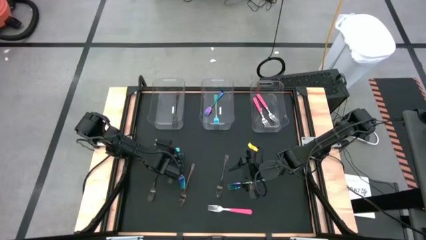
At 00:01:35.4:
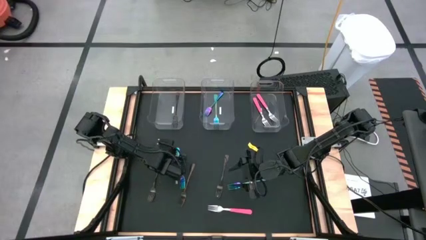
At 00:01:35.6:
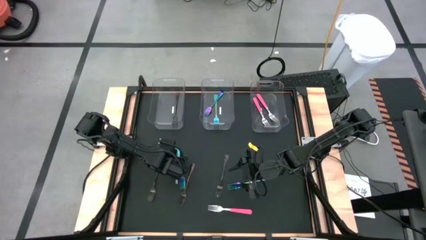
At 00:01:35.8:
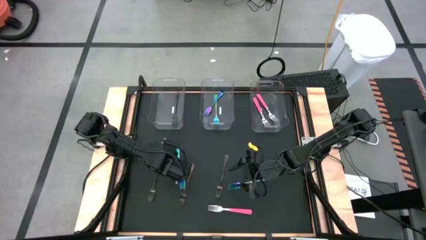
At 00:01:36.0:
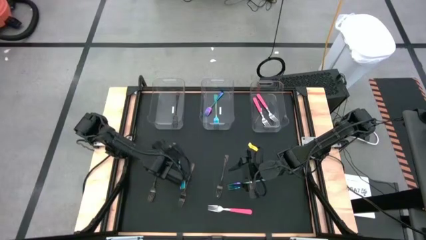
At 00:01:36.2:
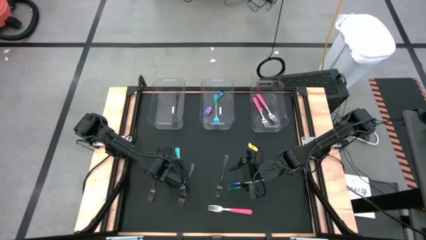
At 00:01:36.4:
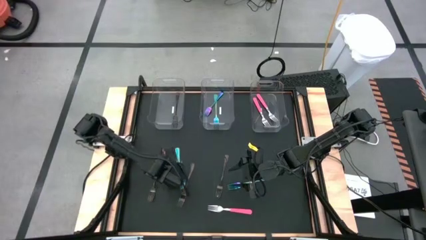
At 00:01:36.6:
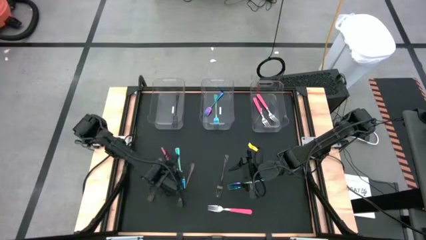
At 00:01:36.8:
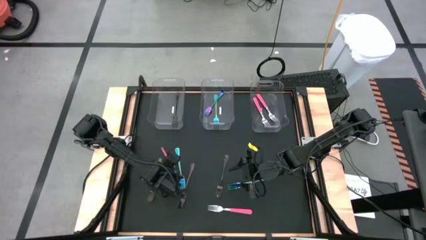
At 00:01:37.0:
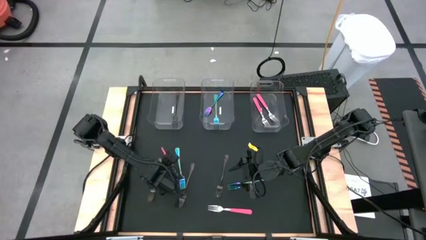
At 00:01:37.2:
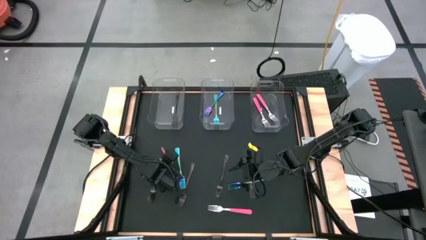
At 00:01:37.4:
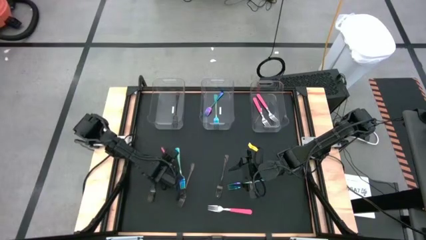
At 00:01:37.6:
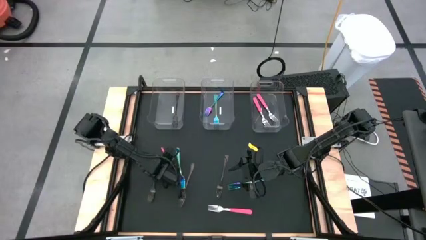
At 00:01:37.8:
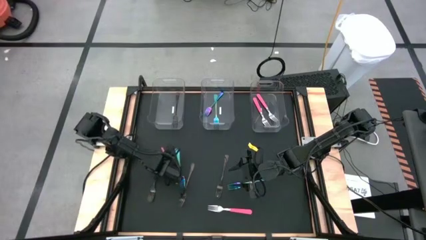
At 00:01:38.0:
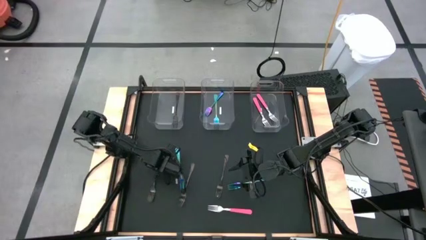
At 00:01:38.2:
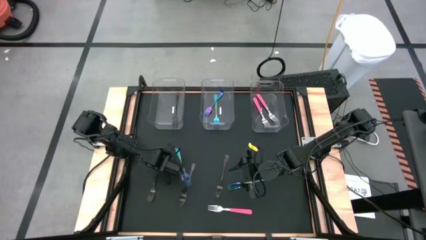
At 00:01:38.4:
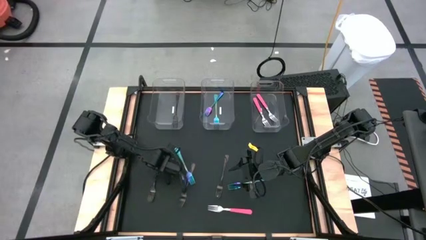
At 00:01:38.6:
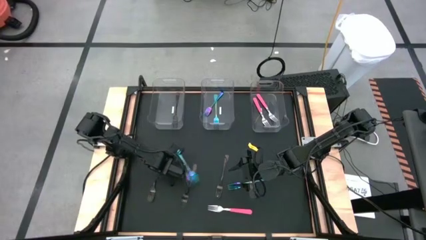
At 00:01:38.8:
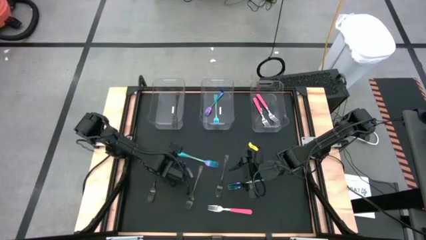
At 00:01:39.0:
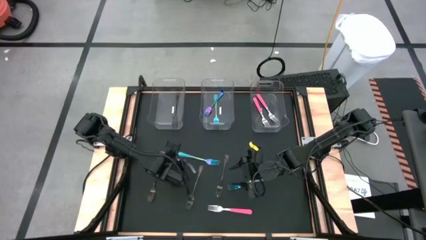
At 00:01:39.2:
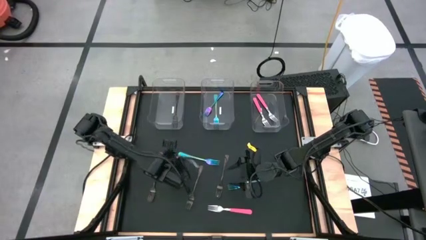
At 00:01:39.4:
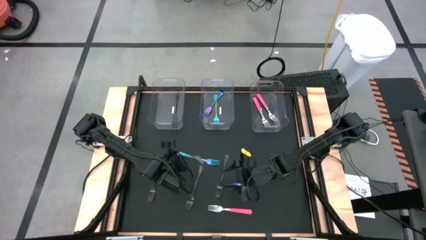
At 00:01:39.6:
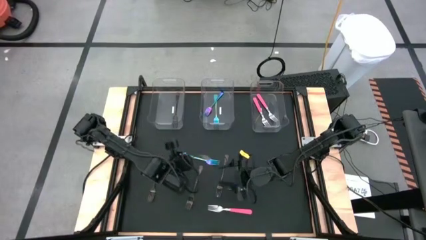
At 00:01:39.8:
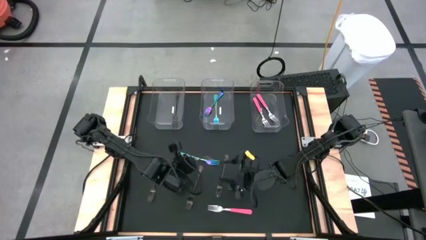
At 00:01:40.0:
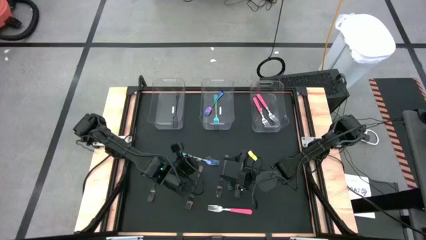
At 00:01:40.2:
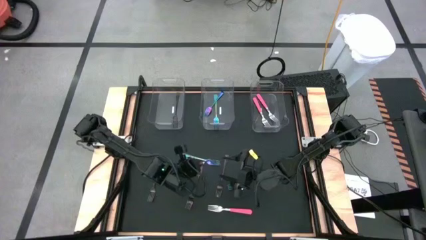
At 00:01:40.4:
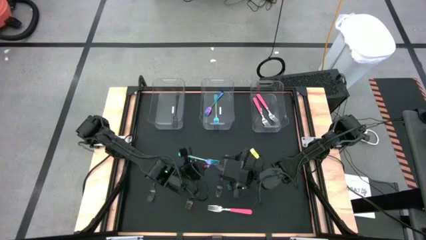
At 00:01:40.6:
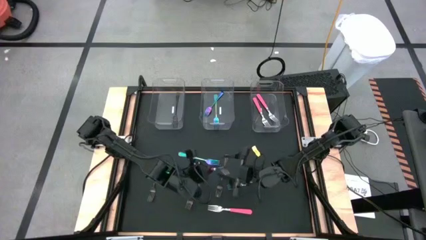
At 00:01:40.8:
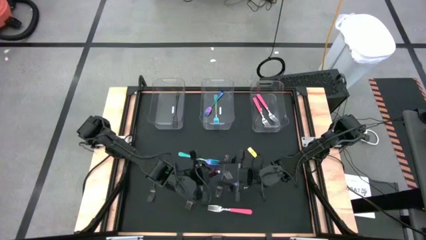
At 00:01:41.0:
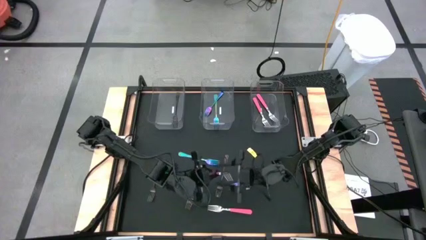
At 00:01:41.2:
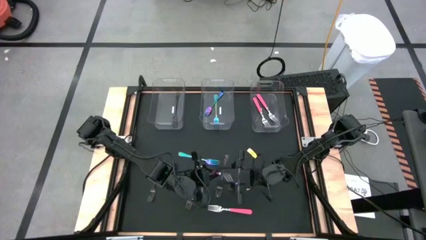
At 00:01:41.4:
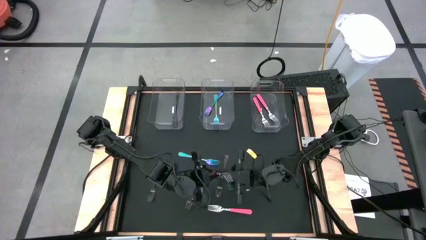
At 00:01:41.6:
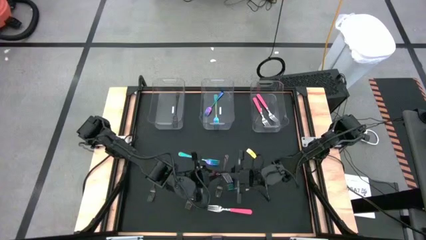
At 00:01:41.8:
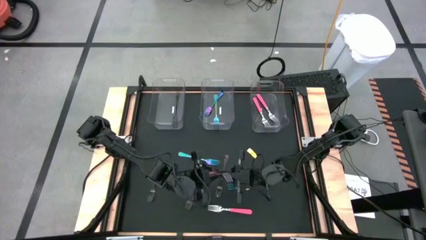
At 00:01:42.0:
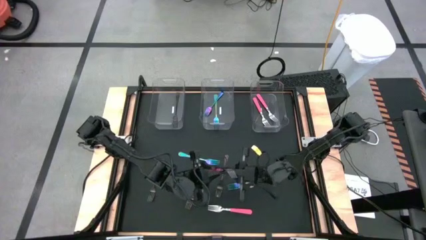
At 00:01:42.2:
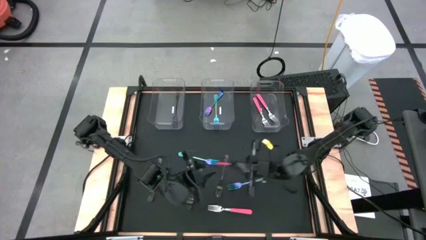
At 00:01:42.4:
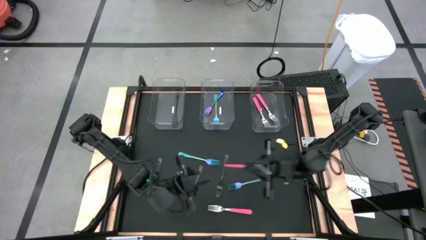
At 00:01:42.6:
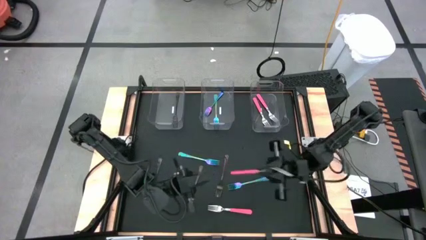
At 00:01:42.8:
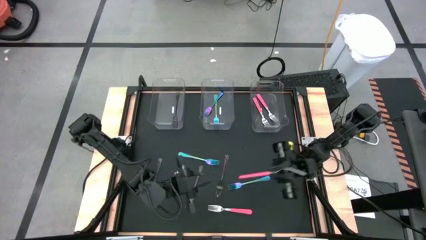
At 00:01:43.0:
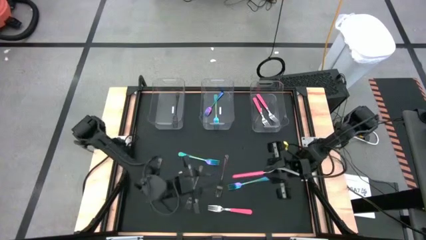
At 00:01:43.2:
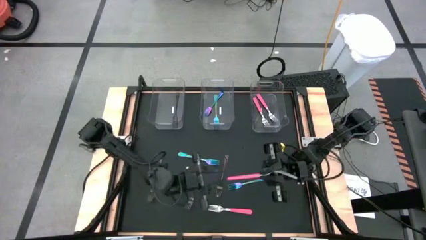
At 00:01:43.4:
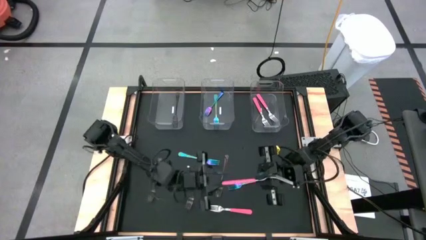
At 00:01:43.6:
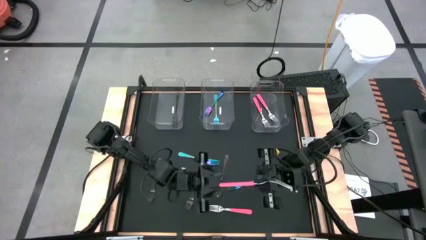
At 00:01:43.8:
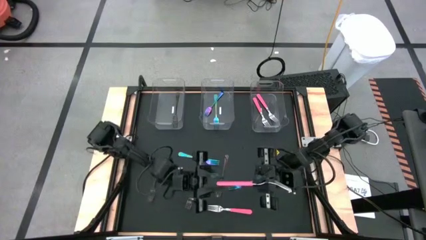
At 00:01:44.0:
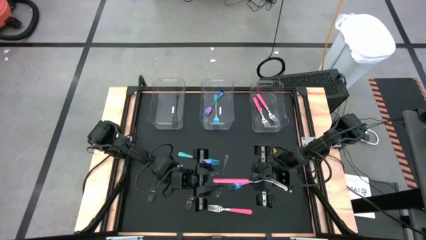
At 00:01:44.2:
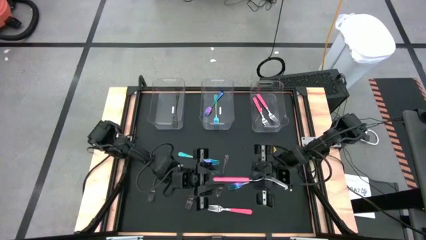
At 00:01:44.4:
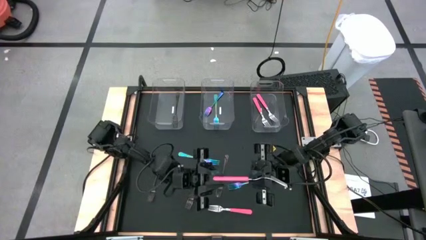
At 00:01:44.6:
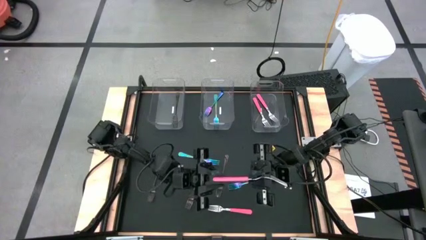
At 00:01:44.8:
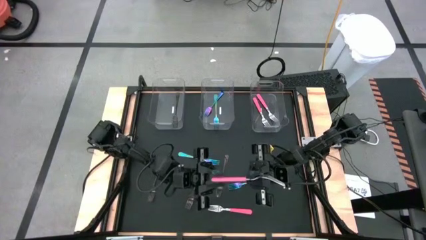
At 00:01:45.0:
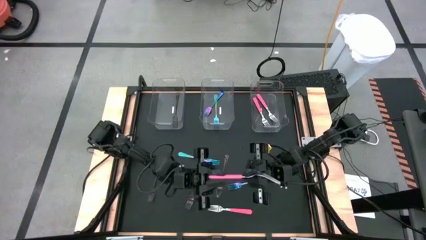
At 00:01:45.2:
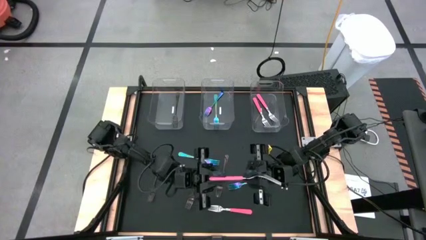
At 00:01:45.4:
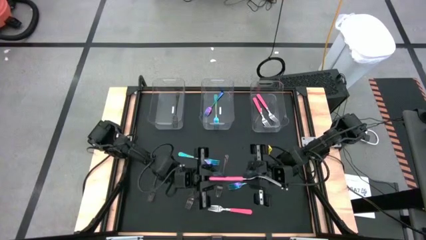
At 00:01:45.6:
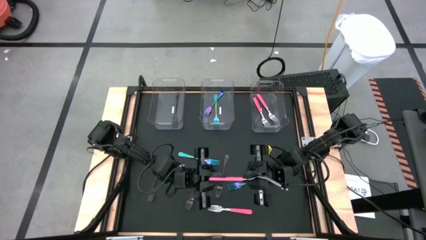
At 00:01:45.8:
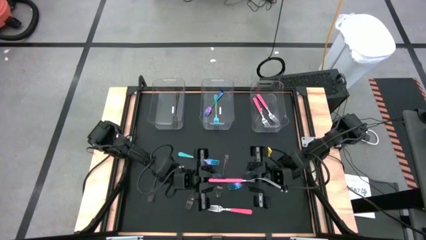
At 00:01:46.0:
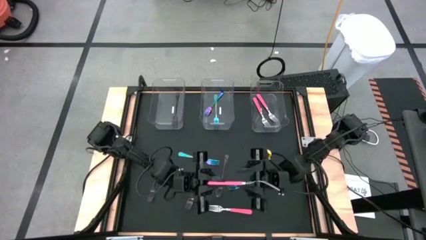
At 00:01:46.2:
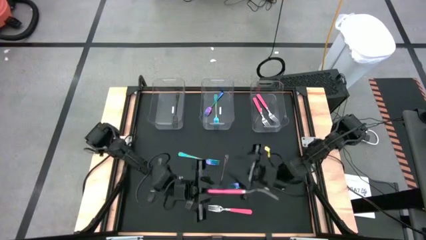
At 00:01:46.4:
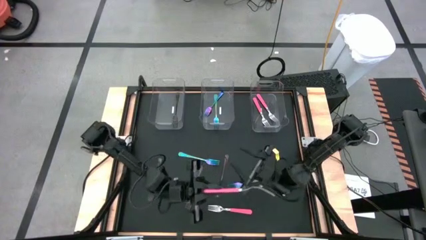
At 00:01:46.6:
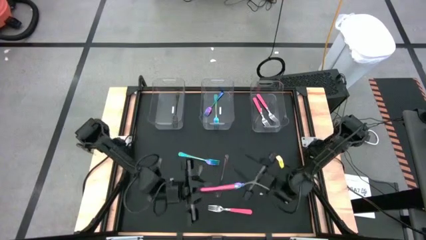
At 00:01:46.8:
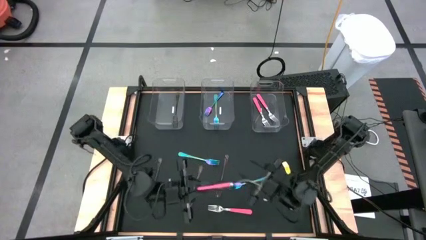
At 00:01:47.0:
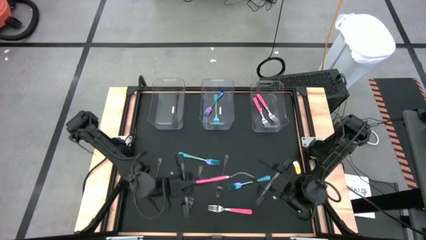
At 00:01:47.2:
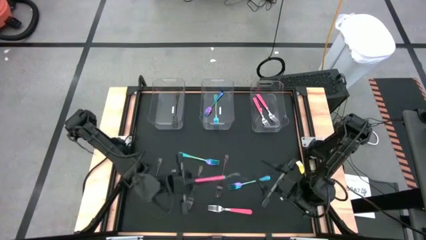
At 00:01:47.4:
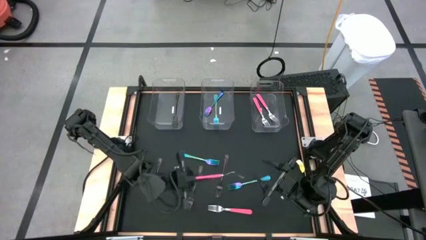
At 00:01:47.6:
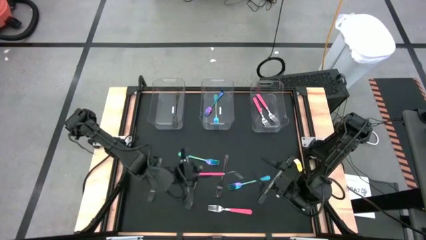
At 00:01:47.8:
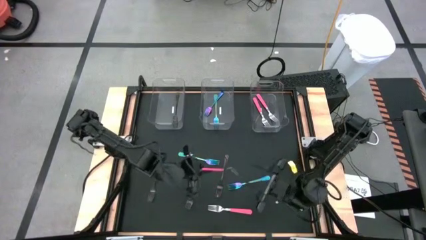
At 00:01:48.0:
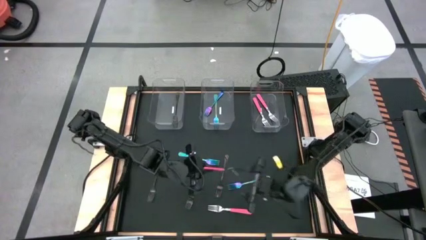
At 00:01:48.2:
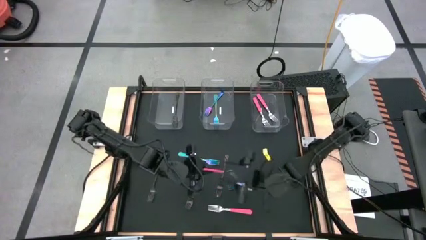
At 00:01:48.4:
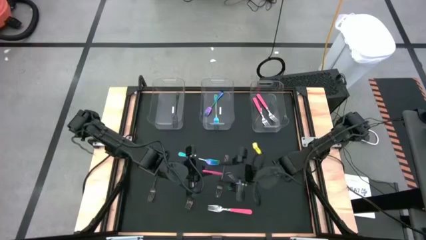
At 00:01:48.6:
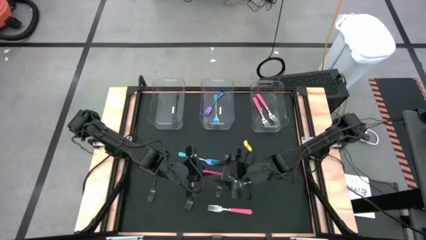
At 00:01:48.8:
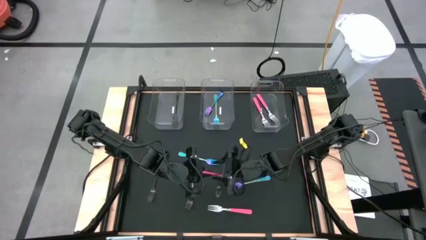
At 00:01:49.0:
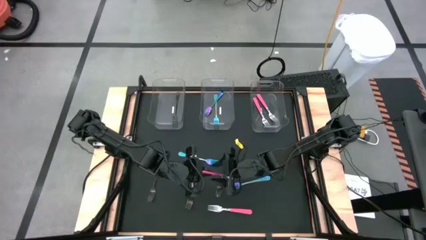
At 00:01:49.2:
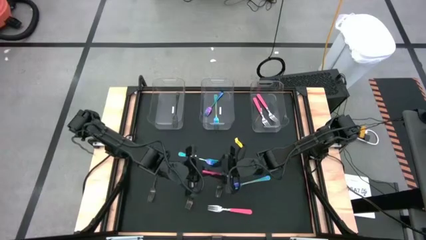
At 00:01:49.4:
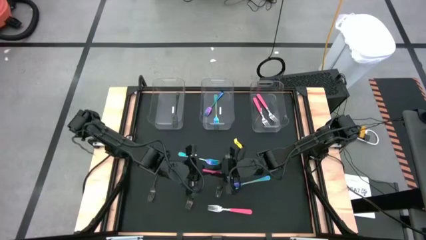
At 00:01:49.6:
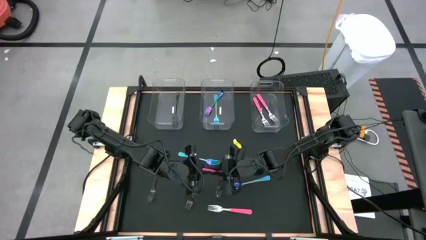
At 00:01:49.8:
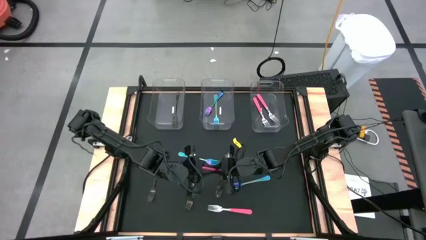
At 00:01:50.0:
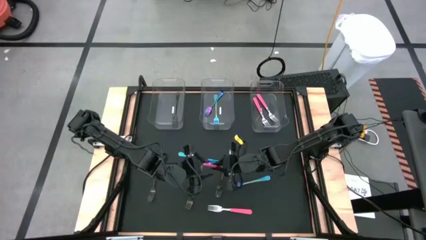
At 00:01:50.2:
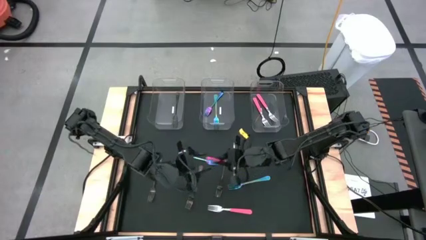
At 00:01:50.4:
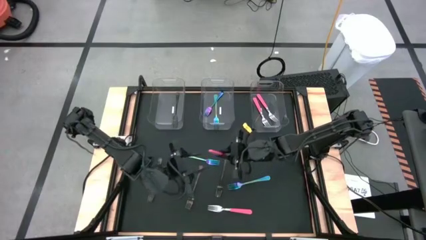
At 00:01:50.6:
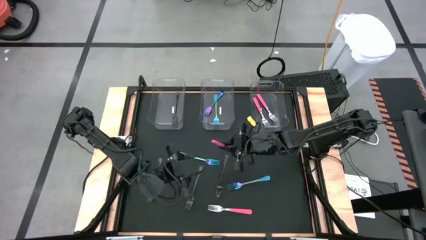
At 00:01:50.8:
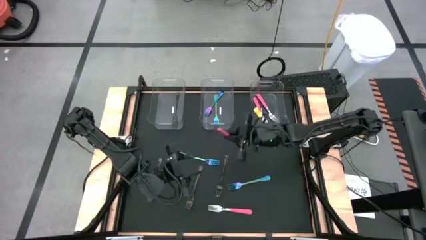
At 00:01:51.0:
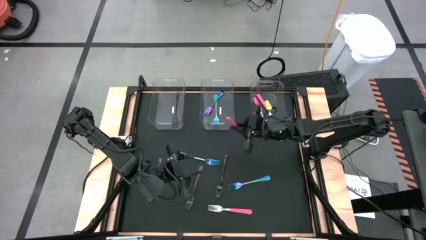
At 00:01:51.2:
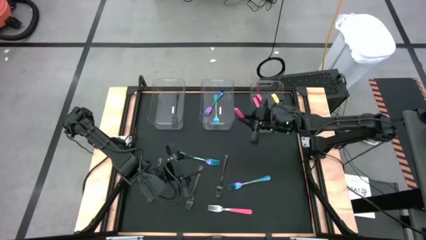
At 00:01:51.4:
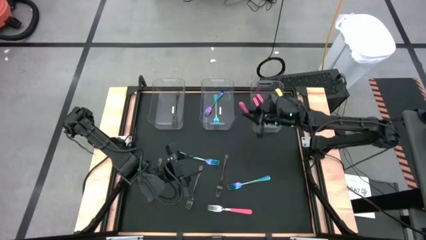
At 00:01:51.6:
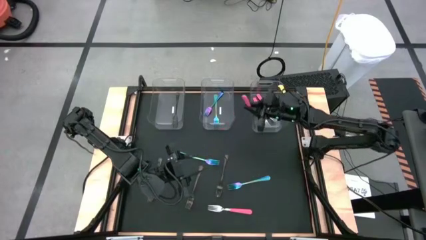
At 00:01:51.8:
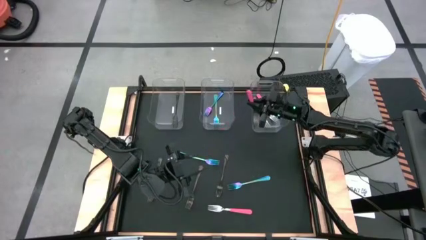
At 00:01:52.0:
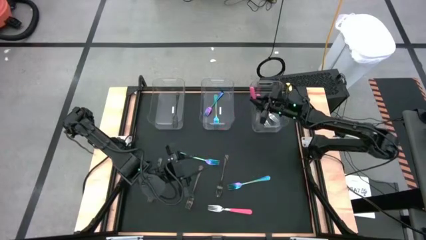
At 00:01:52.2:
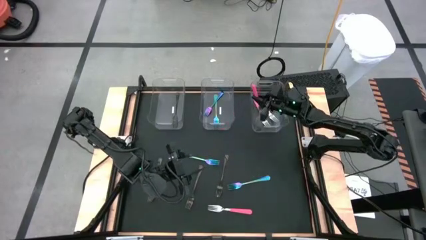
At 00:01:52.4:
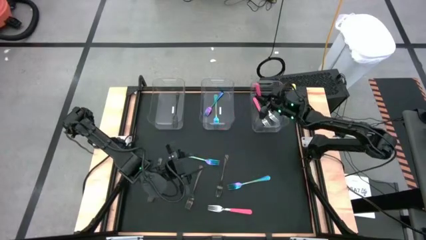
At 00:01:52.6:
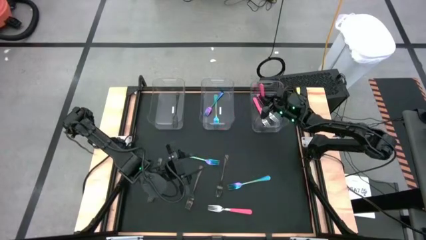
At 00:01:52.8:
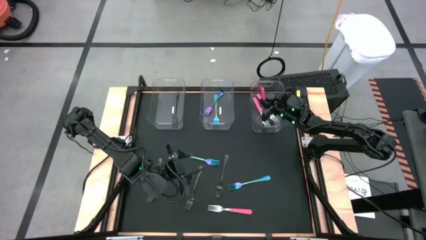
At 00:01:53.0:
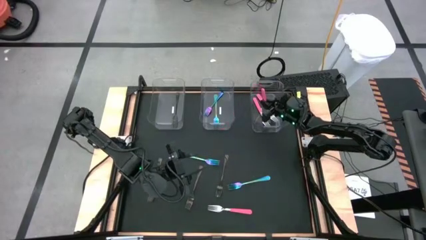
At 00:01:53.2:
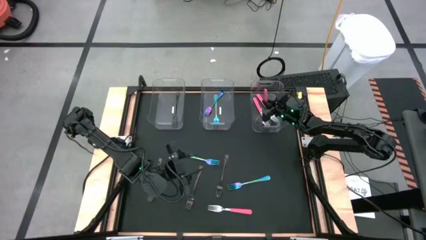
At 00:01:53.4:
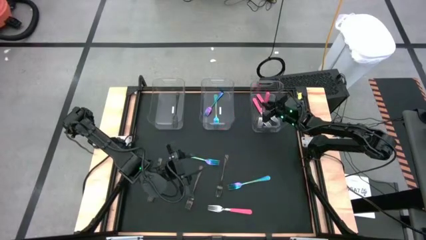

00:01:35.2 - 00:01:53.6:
Task: Sort silverware by color (type)
Put the pink fork into the right transparent bin
